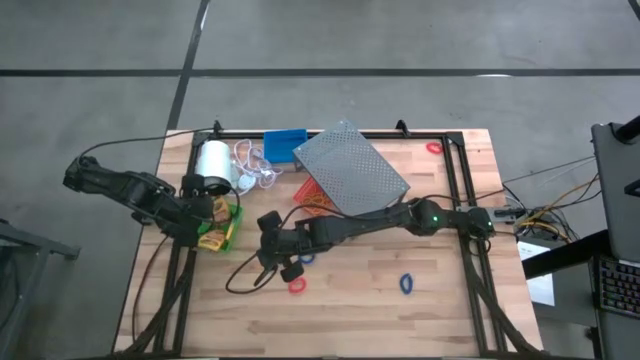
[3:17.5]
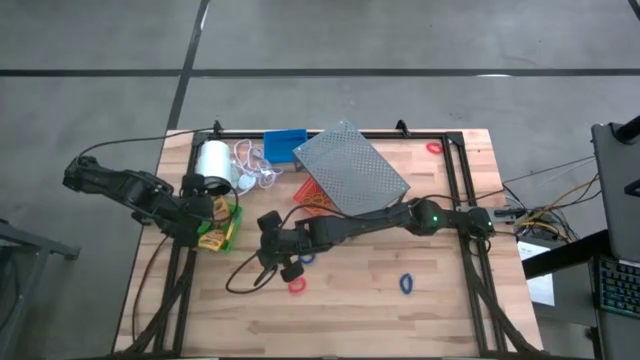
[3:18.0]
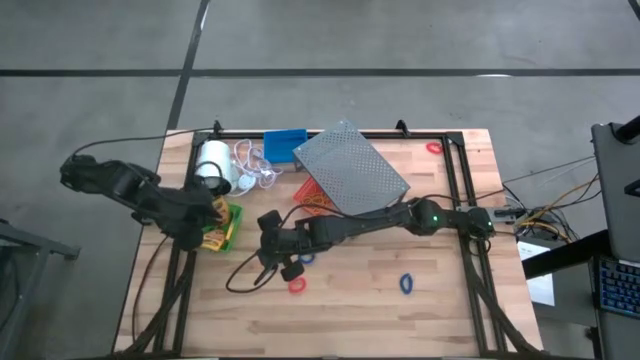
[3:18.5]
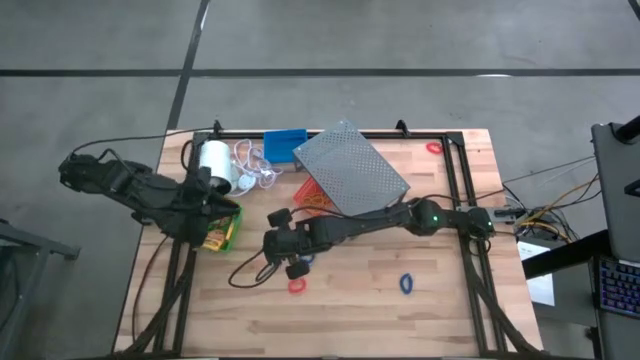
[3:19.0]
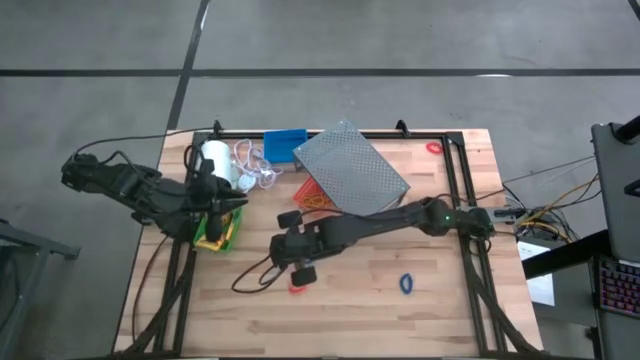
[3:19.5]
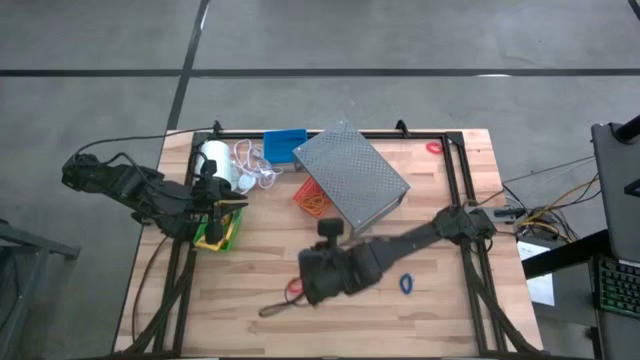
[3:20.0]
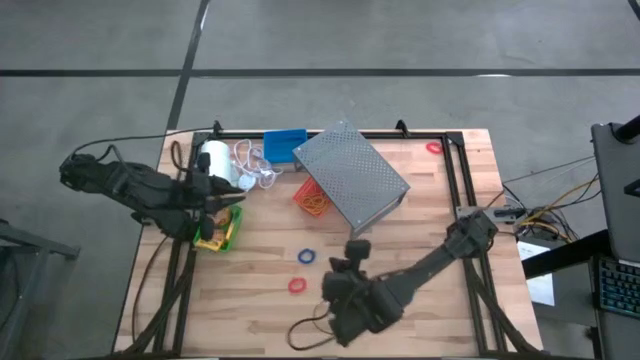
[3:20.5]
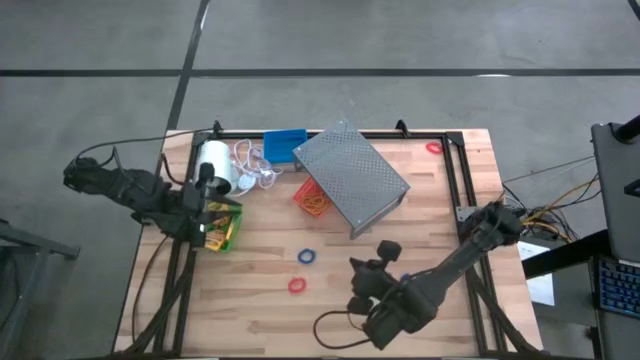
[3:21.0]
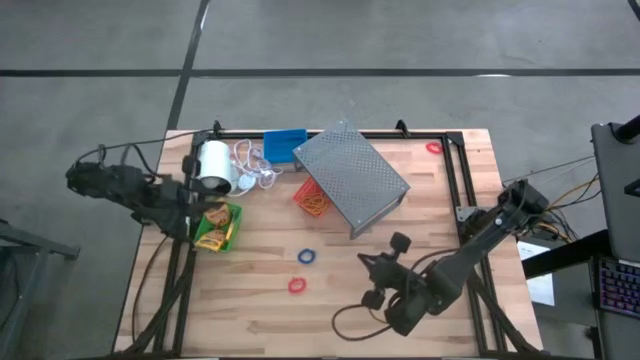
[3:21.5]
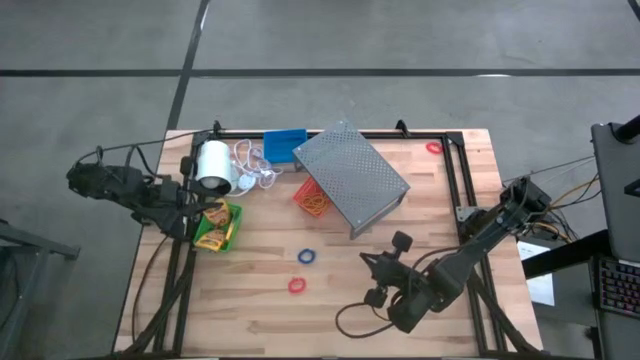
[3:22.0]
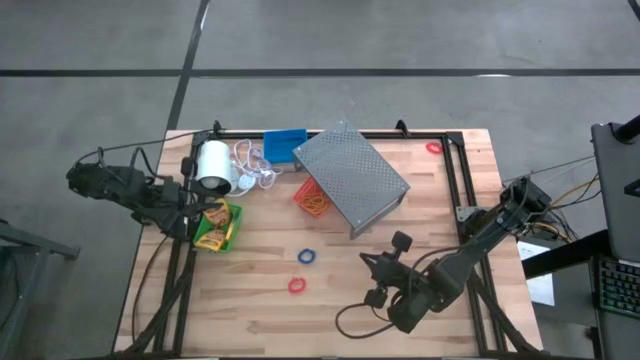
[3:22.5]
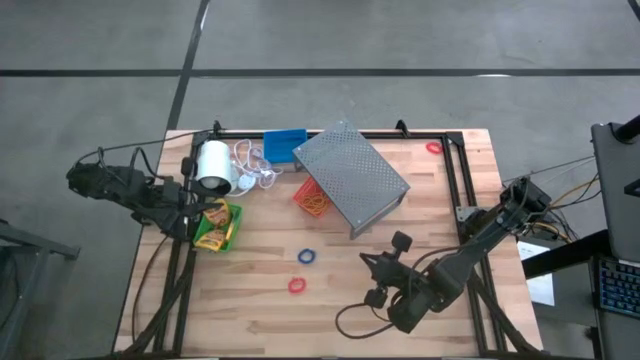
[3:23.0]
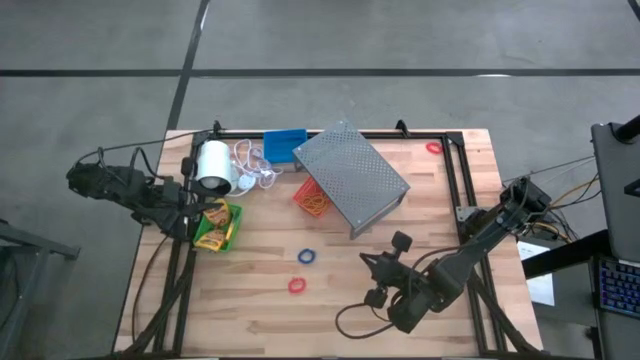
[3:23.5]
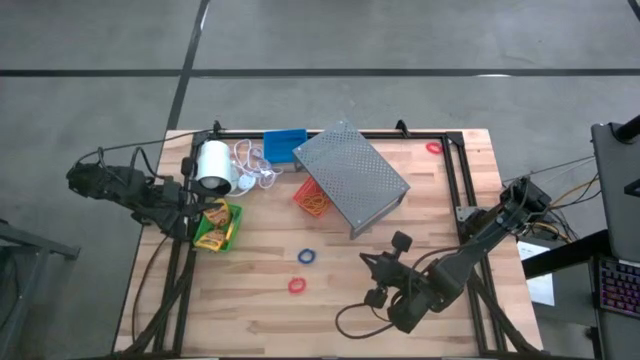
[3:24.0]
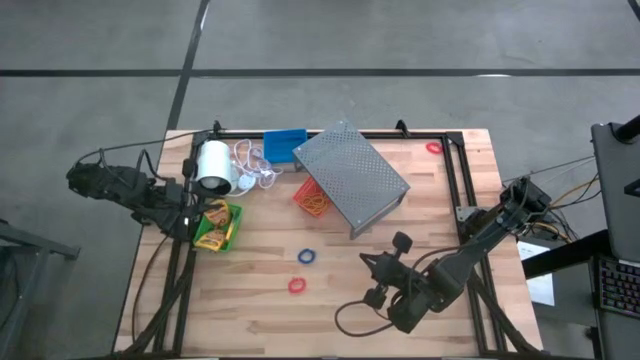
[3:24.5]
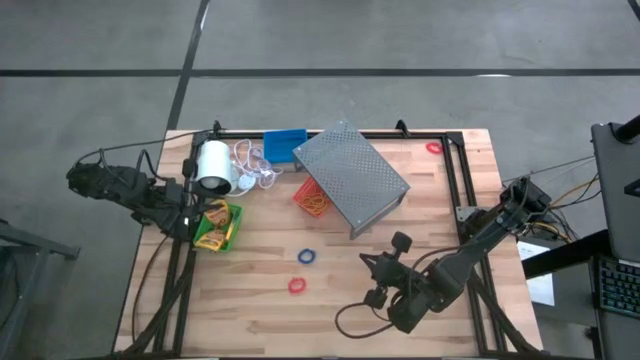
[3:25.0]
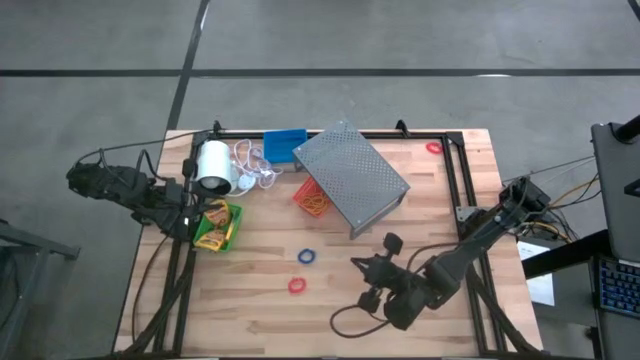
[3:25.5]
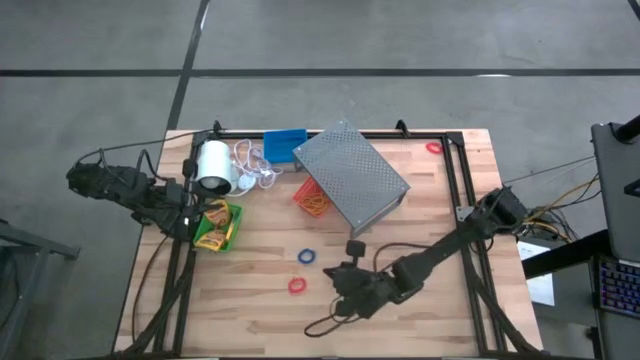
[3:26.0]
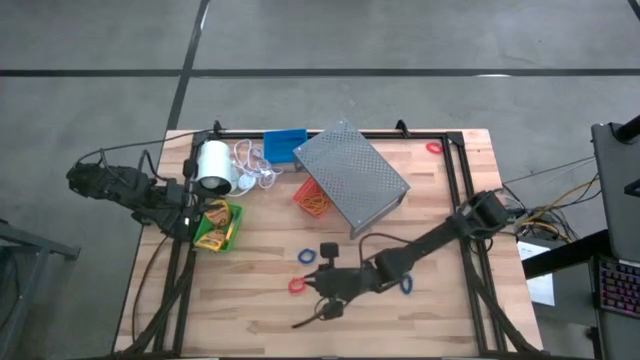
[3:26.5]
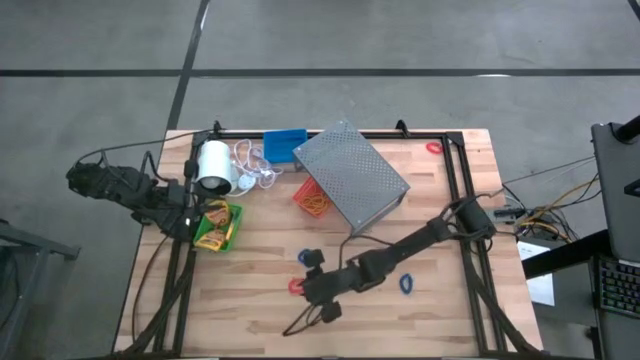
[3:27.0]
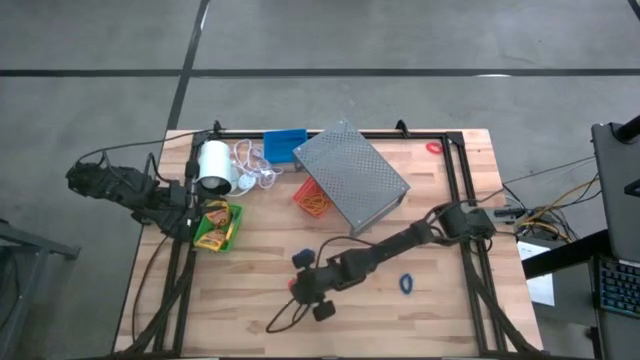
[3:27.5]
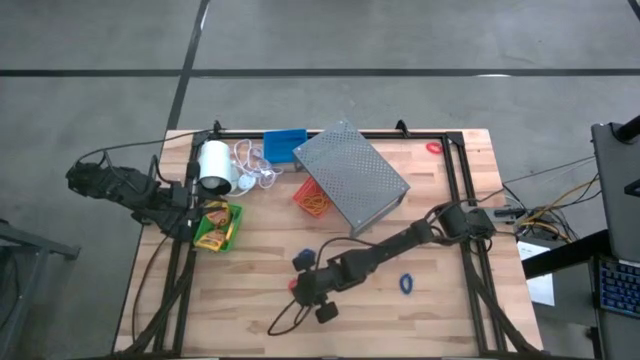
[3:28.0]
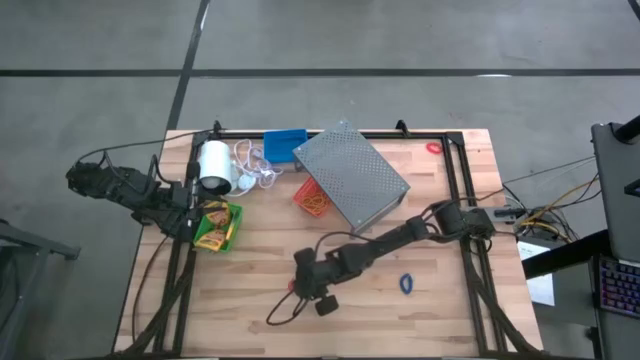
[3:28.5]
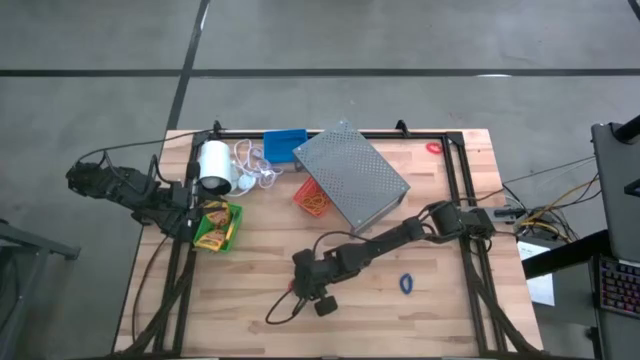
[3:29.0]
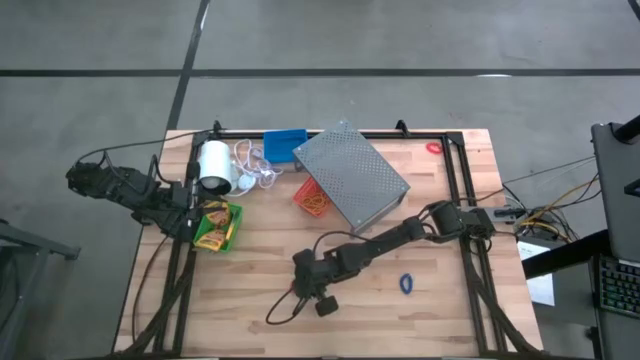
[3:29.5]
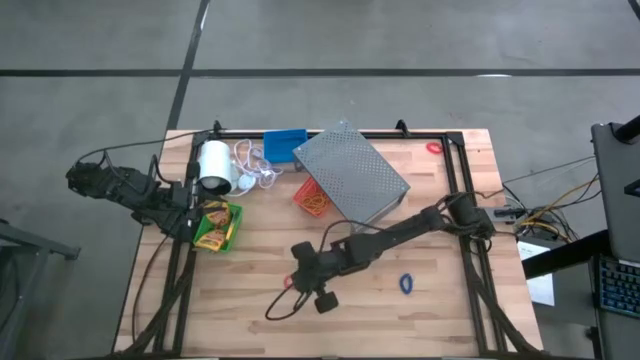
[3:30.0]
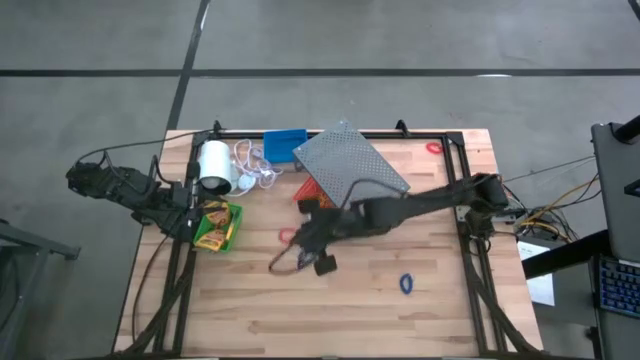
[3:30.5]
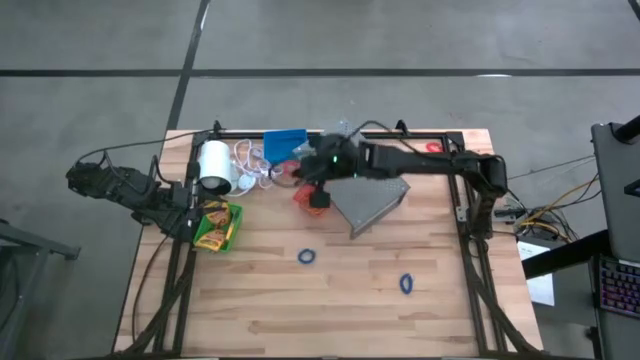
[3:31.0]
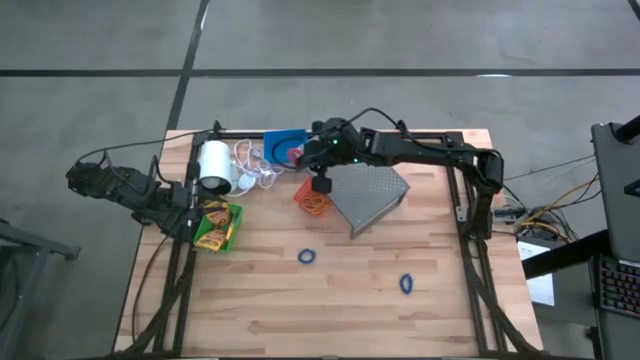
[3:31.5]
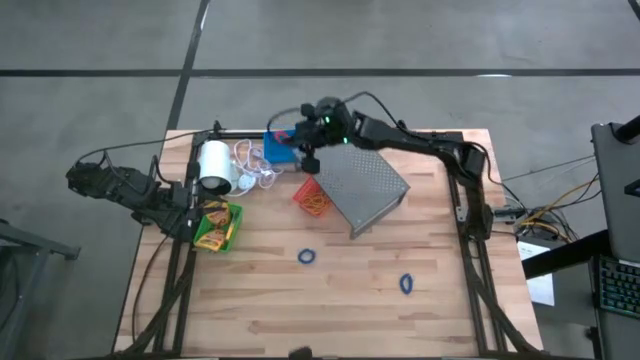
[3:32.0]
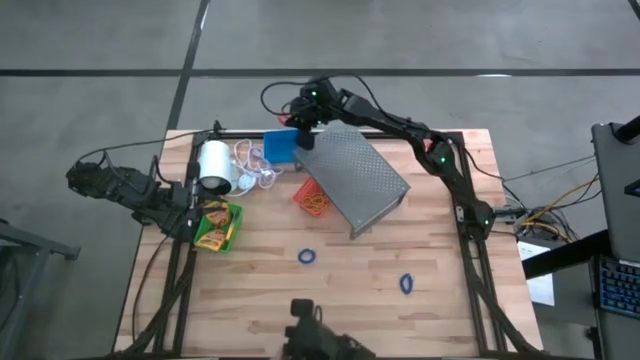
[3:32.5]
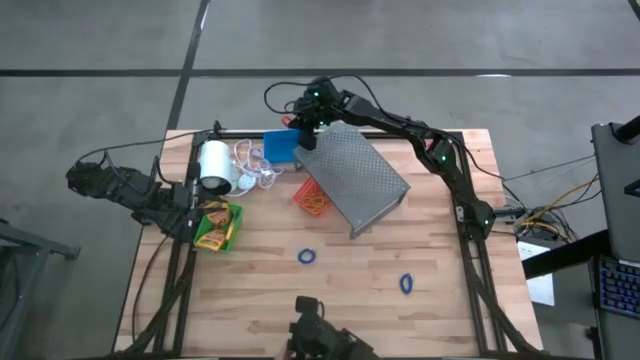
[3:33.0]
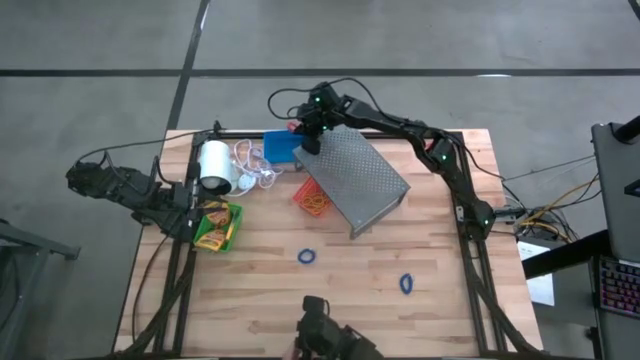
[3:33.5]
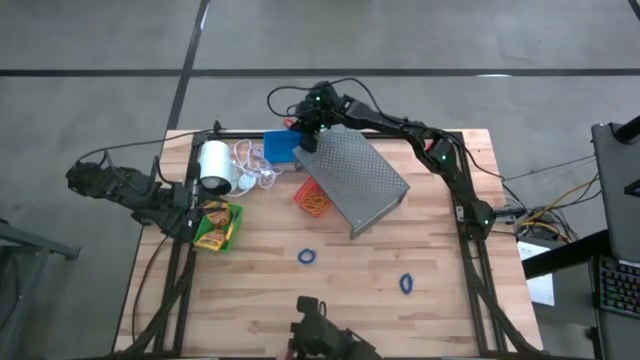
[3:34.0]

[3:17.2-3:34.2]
Task: Pick & Place Office Desk Supplies
Put the orange spring rubber band into the blue bin

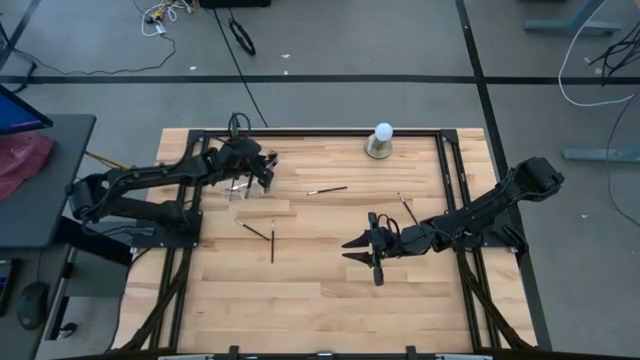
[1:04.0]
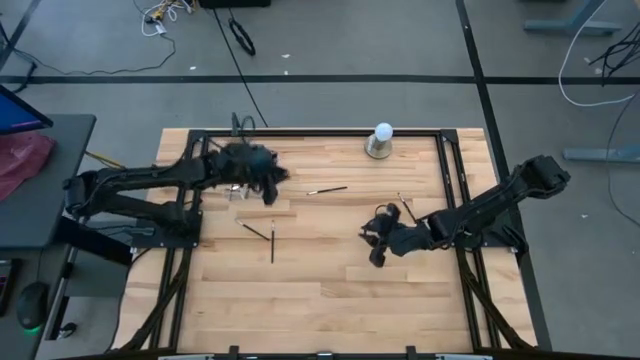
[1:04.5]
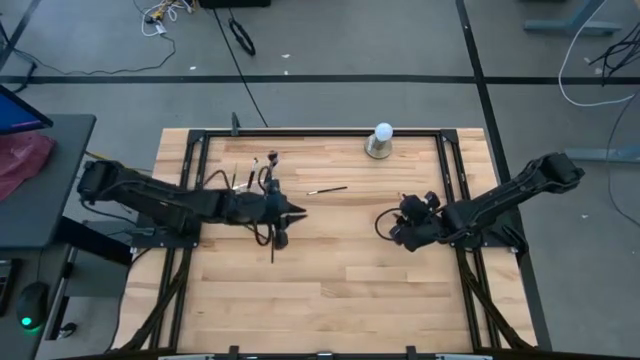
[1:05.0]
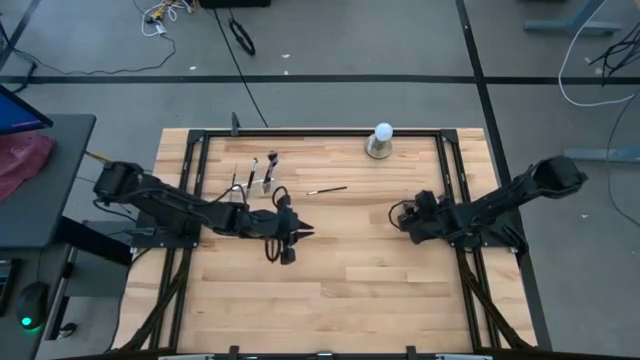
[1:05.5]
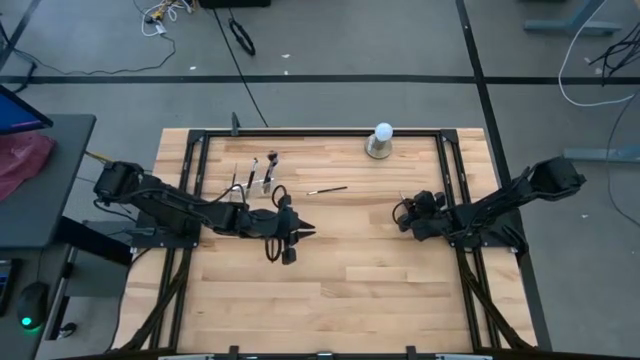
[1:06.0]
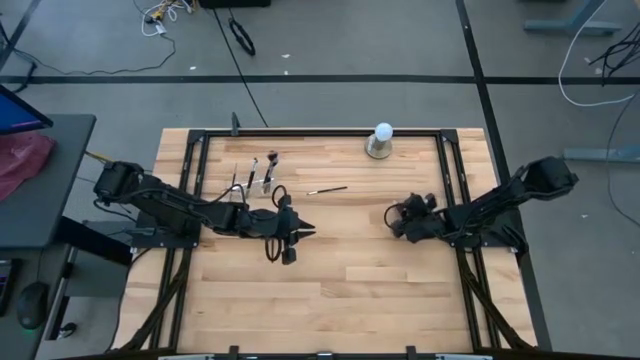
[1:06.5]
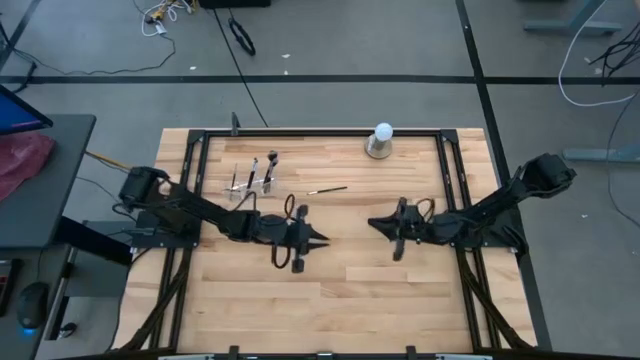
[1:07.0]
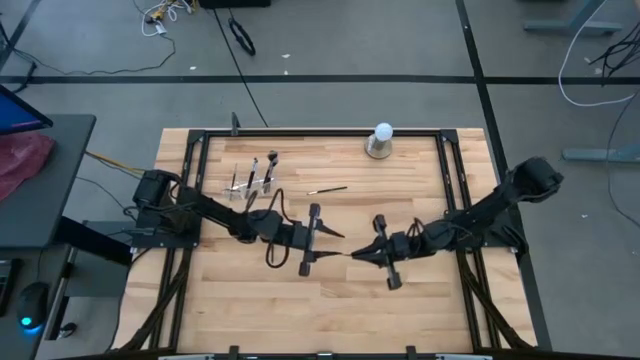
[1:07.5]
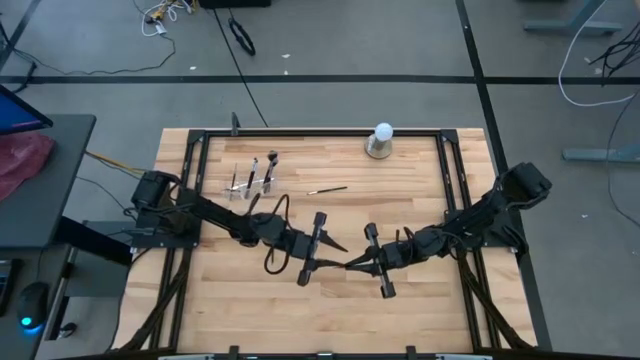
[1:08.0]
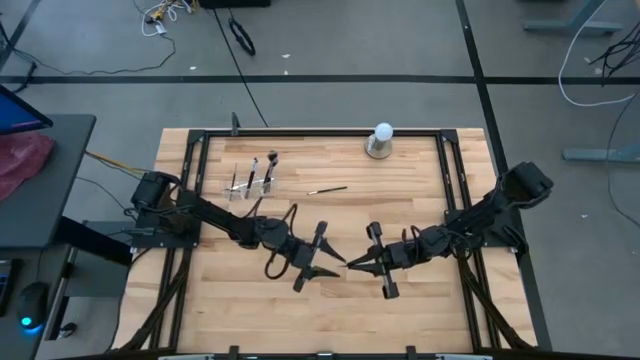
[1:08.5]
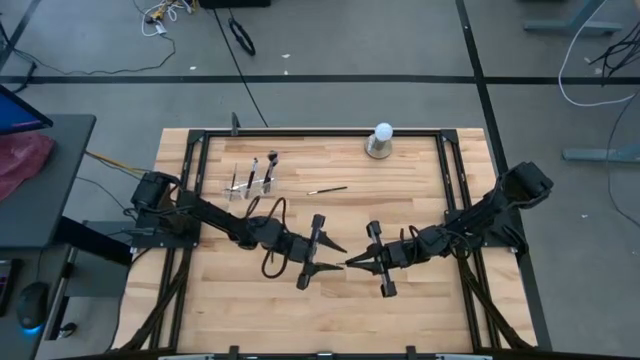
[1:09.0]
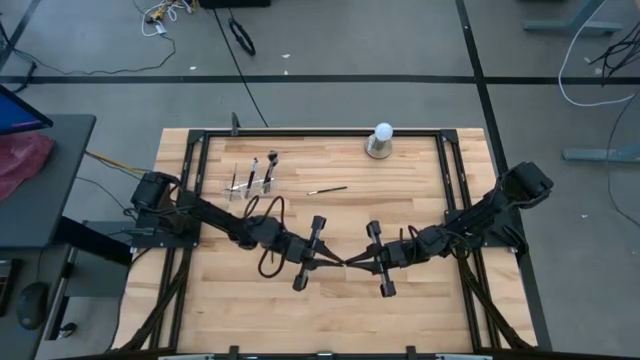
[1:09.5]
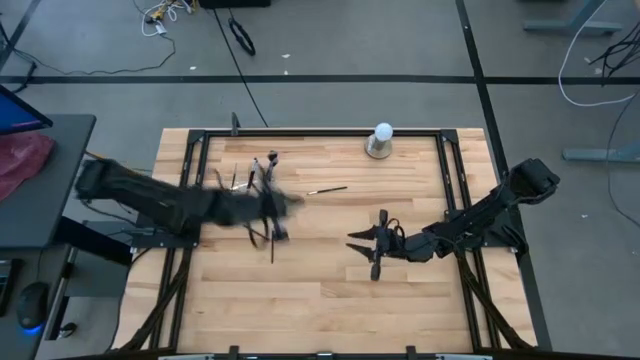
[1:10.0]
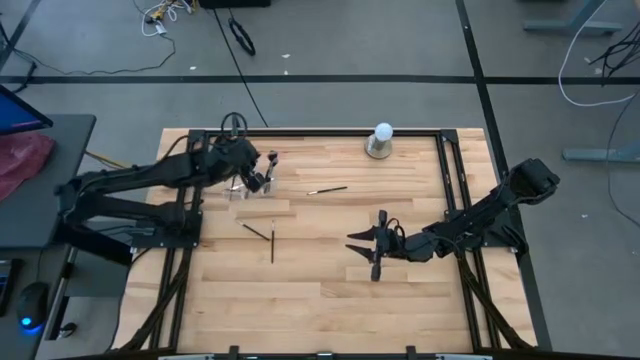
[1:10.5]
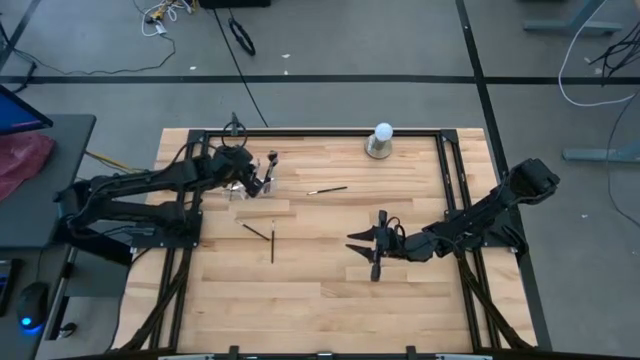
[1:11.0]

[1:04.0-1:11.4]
Task: Put items in baskets/containers
Put the black eyeshadow brush into the middle section of the transparent organizer
